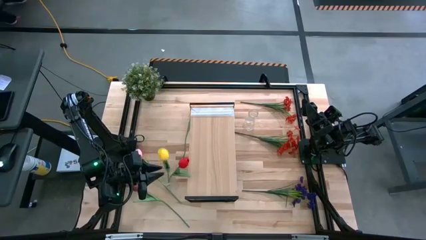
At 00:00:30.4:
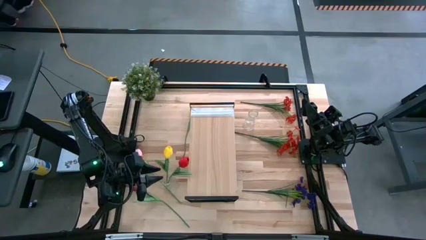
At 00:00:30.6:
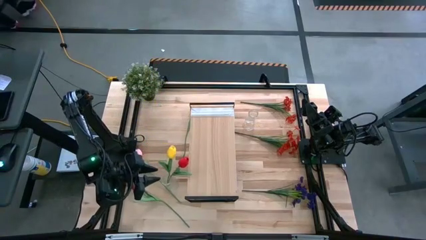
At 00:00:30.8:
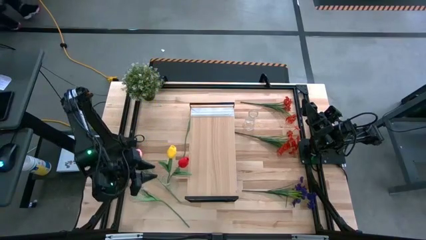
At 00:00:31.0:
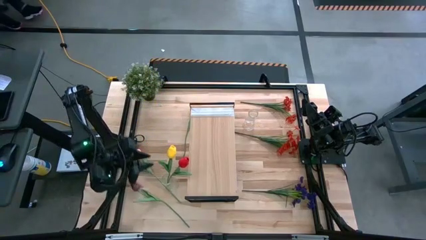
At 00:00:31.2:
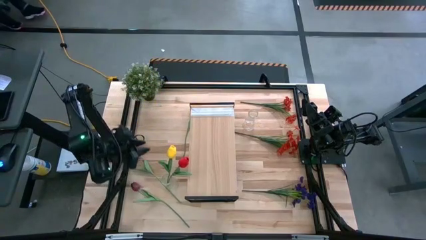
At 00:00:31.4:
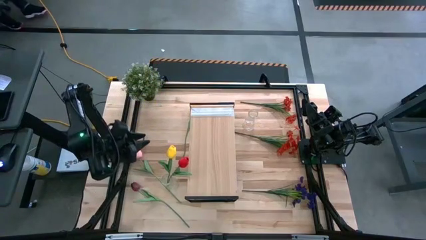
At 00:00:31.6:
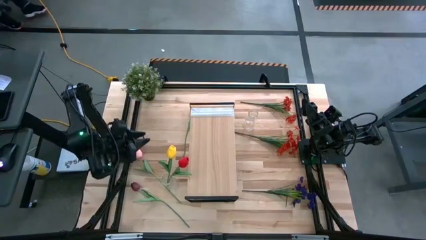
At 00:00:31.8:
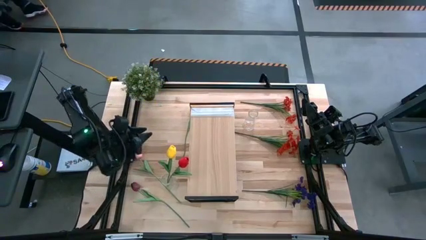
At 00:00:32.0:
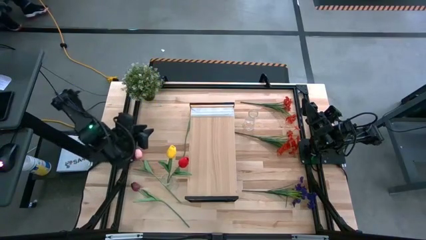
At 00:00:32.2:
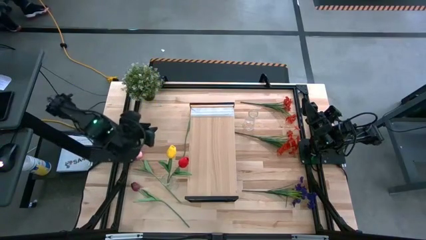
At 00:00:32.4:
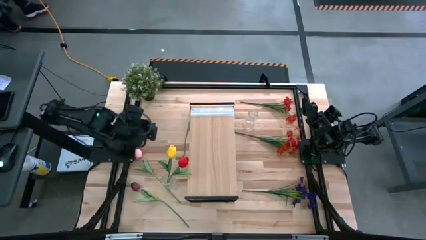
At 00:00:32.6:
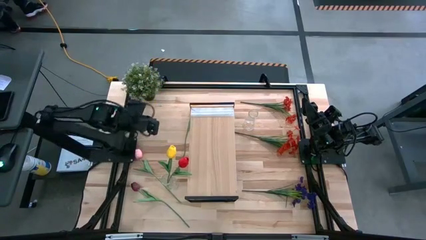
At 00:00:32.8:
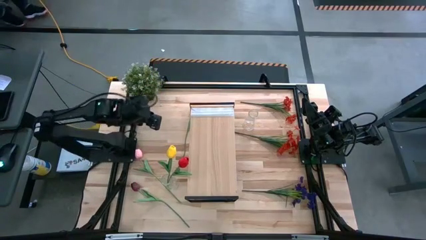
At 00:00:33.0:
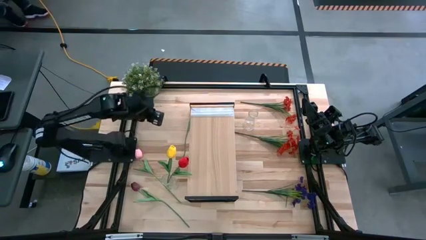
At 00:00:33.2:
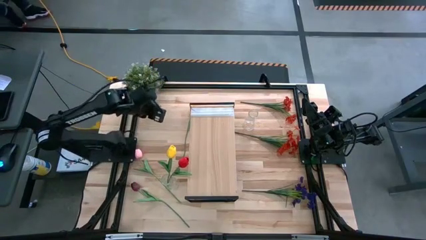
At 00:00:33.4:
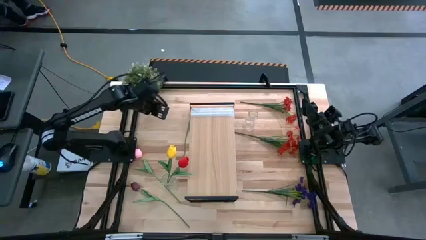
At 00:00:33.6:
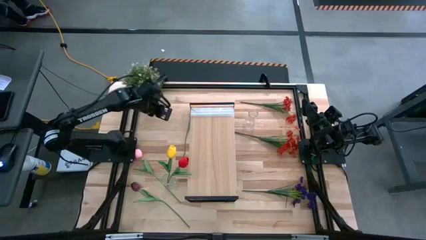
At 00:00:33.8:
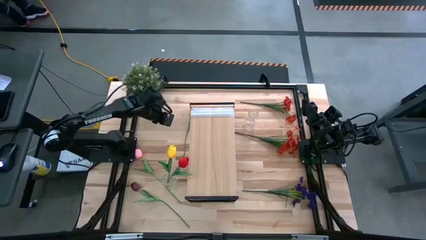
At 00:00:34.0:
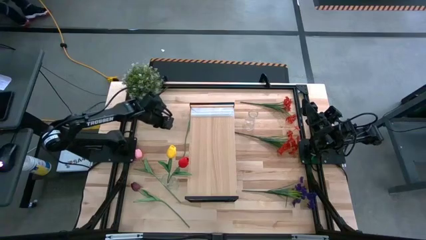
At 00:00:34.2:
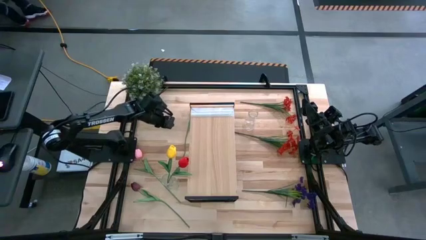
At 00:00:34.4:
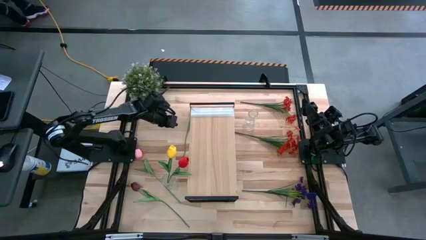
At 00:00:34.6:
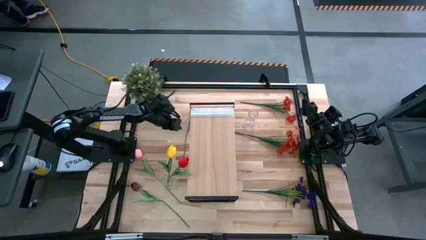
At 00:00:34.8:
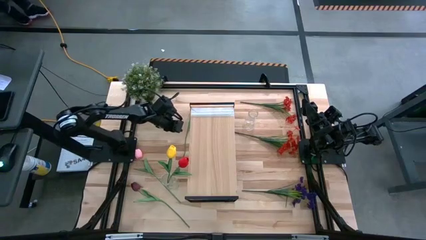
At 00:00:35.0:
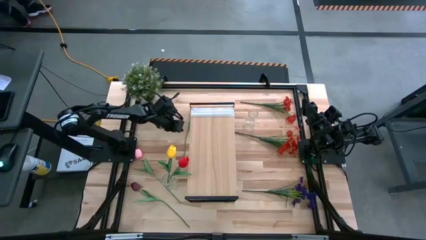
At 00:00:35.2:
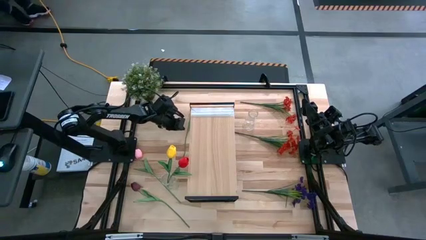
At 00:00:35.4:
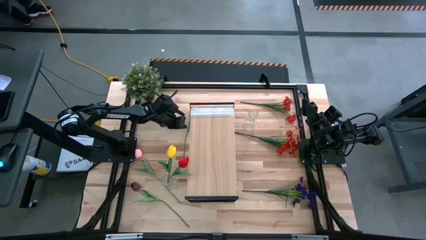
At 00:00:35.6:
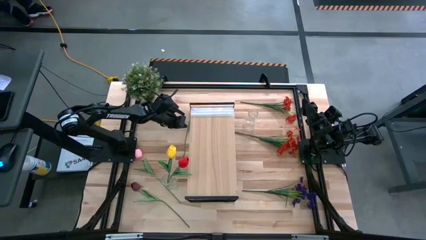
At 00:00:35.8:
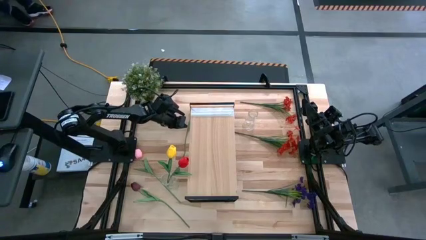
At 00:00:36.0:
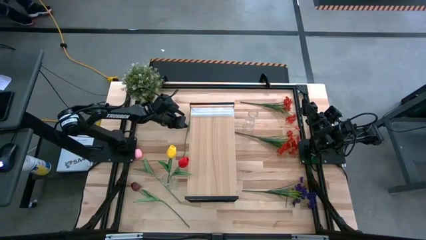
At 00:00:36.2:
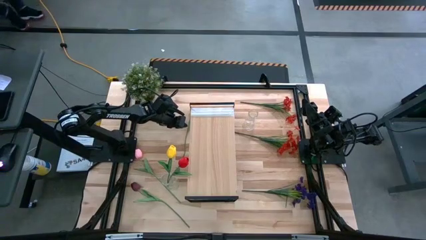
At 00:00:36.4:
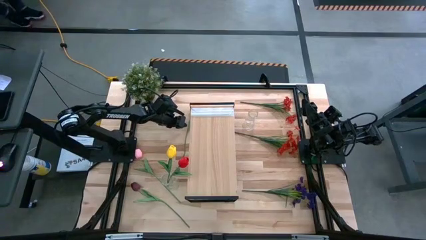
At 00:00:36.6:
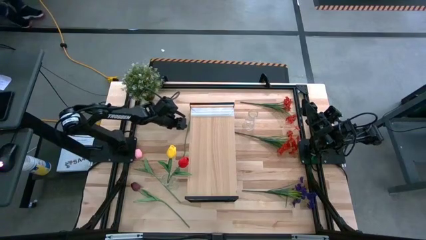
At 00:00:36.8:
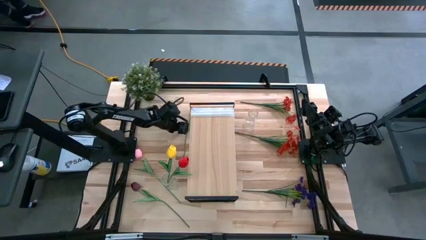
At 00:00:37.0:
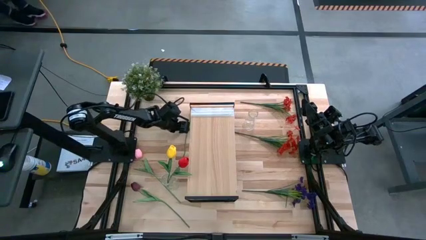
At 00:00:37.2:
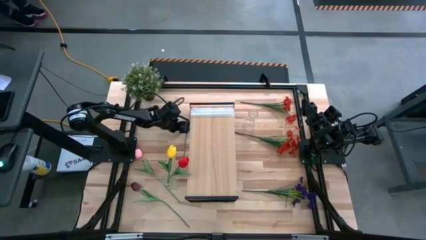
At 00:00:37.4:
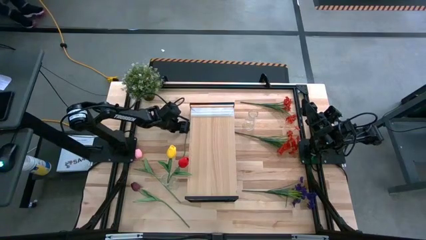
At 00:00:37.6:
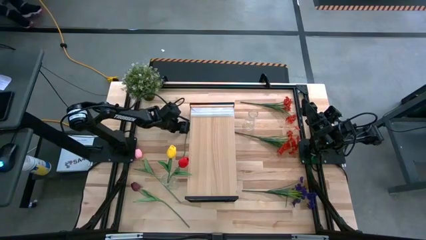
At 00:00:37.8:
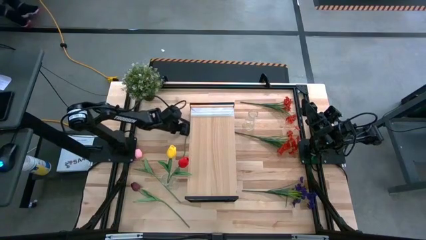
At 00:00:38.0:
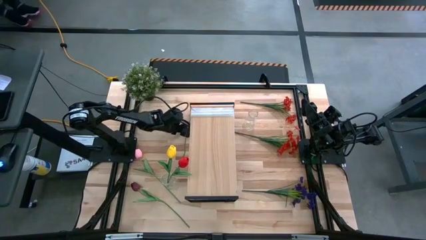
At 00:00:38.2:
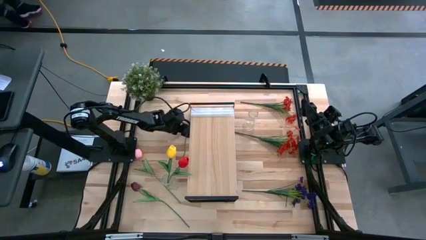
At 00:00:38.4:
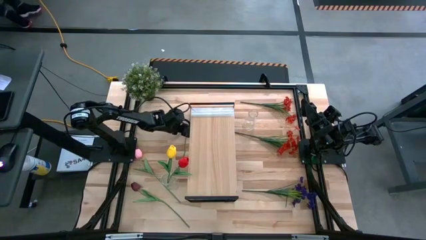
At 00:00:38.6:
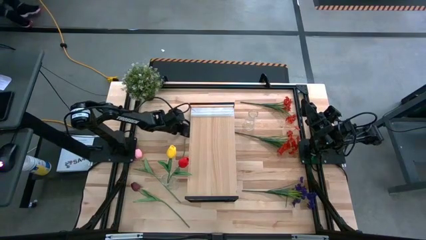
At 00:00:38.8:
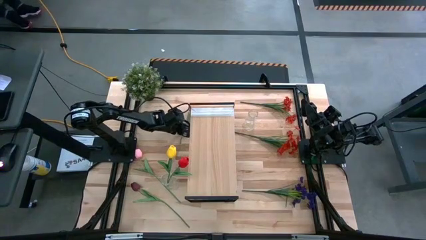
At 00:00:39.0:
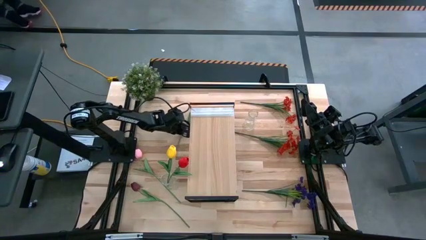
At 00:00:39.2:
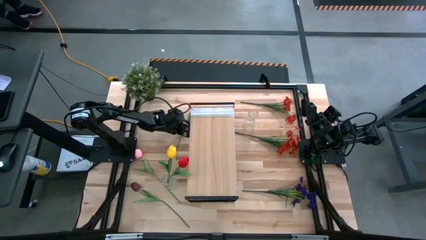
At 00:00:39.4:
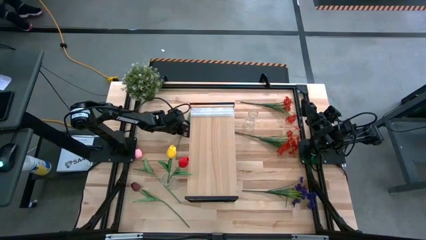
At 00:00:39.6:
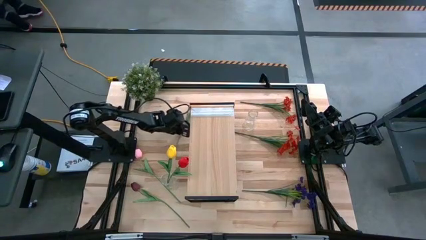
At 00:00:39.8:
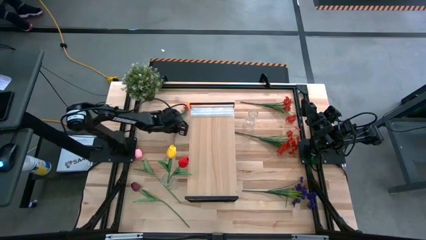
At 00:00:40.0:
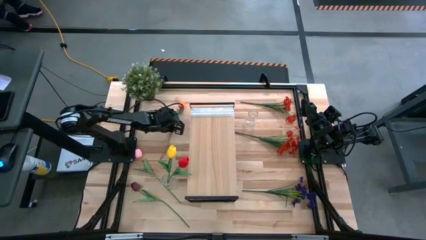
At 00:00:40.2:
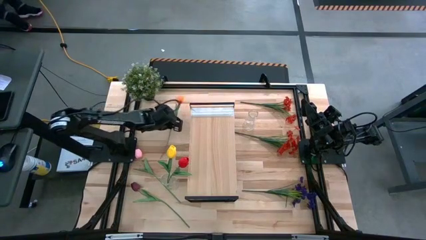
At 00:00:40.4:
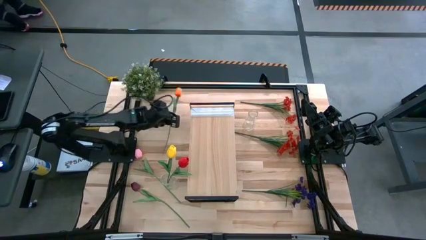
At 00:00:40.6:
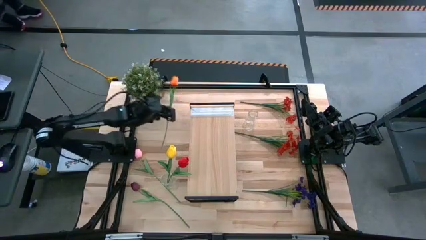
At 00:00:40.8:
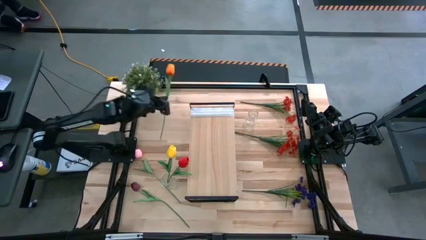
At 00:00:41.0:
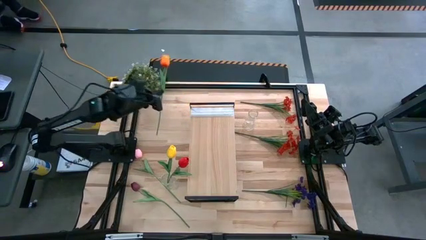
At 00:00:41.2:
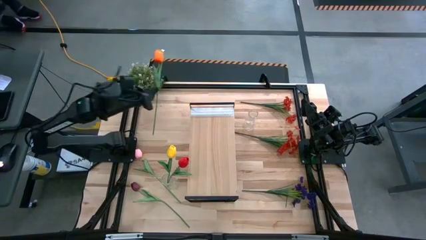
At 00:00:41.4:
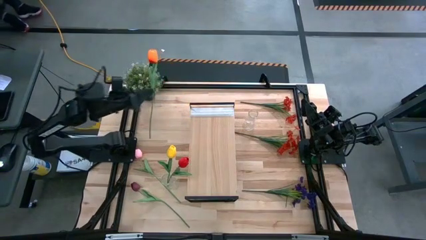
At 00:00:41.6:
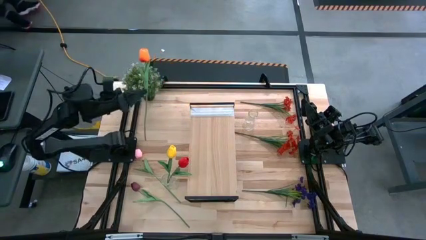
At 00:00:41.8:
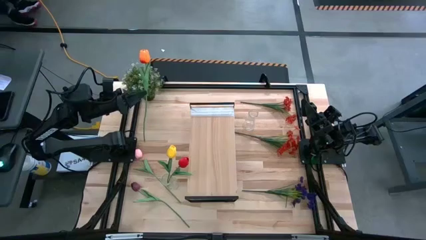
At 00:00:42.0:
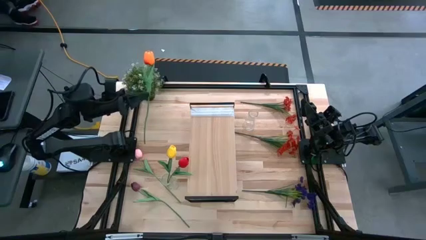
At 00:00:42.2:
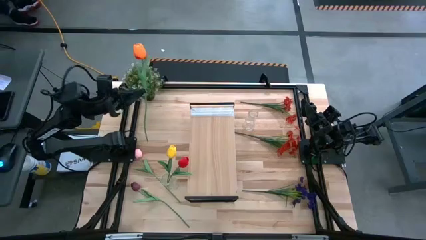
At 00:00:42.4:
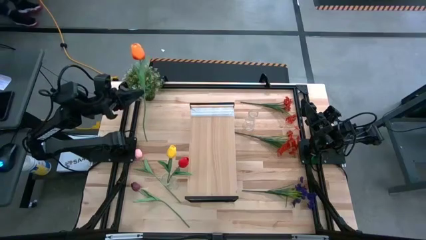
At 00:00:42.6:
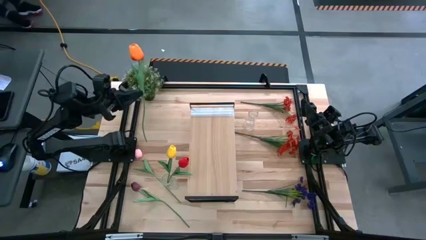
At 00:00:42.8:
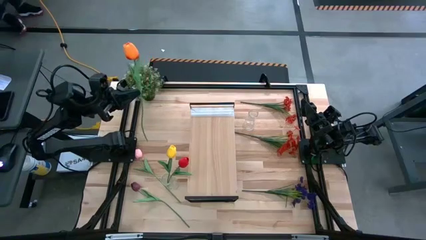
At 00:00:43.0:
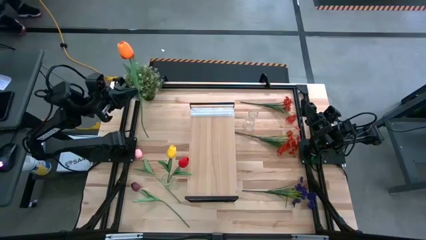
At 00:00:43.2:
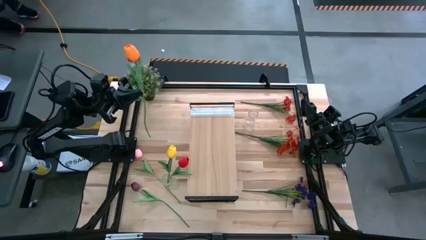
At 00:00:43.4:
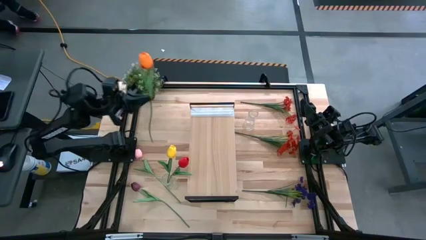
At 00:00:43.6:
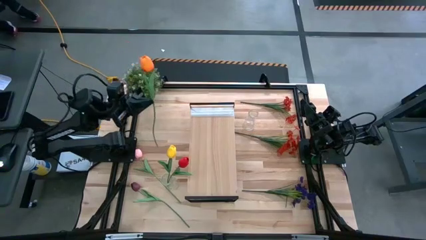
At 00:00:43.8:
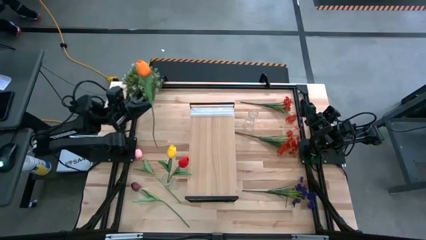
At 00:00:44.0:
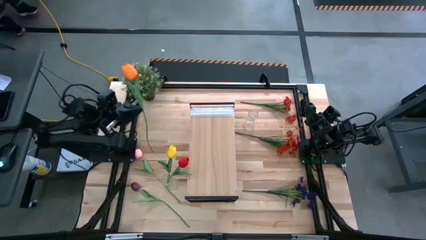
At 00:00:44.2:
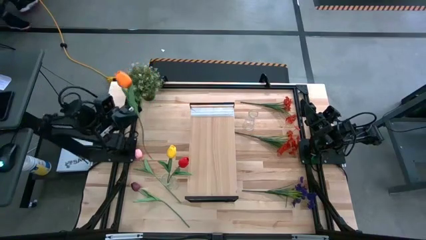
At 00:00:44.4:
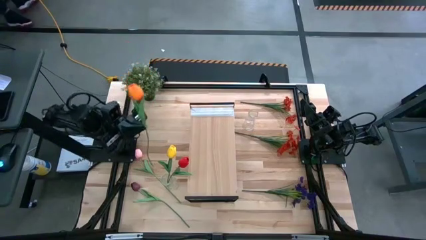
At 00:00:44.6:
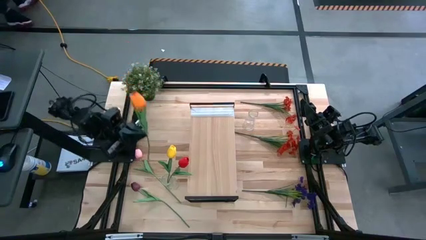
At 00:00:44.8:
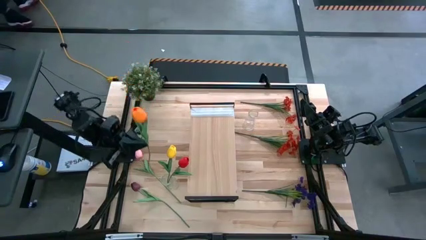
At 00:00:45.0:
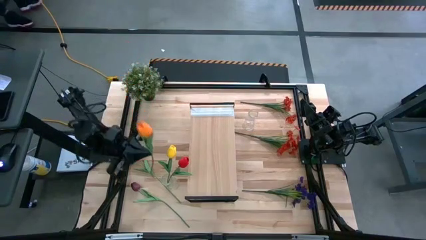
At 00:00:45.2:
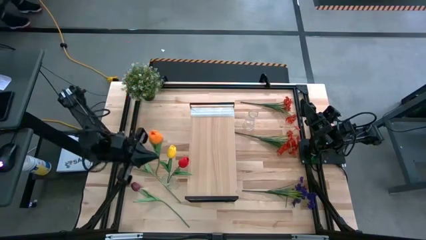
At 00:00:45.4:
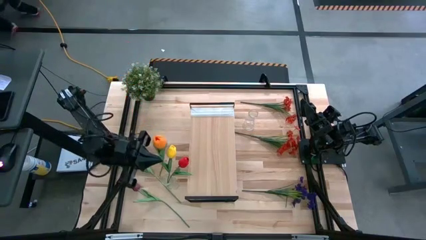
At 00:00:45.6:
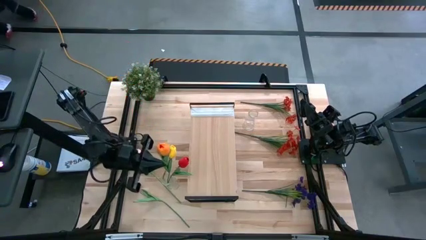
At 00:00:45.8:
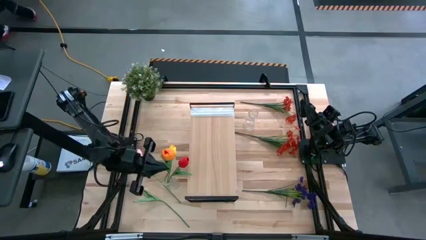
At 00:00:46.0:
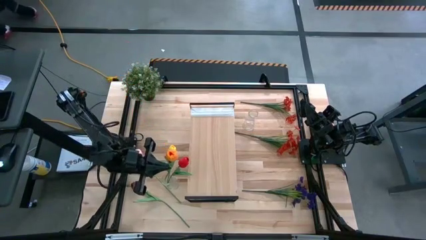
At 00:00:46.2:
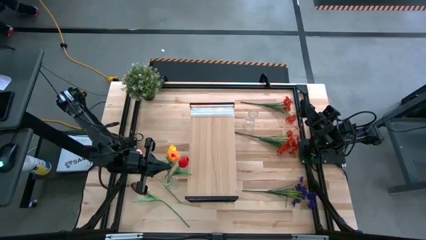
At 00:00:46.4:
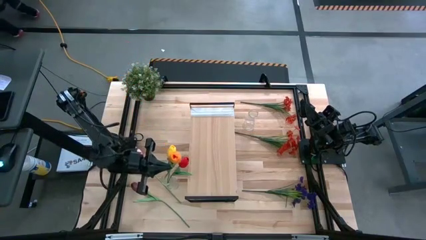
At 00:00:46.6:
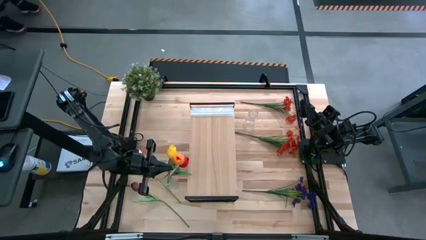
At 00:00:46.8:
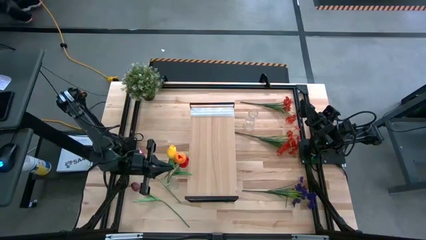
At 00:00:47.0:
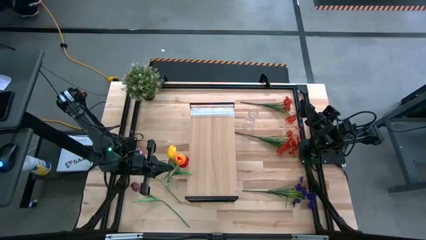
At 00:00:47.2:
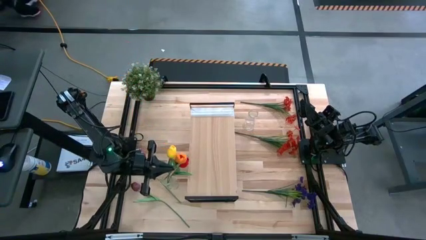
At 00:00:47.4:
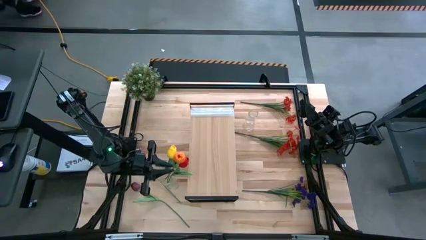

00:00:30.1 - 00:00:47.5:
Task: Pick and place flowers into a vace then onto a shelf
Put the orange tulip into the bottom vase
